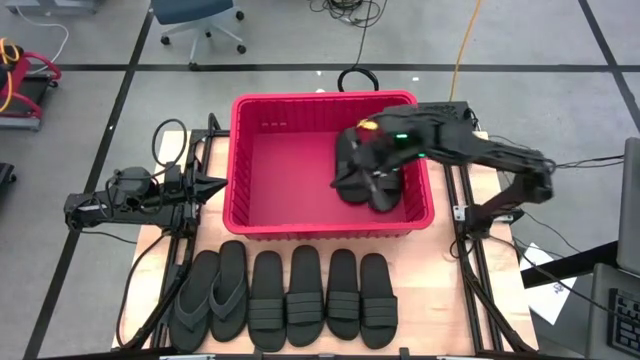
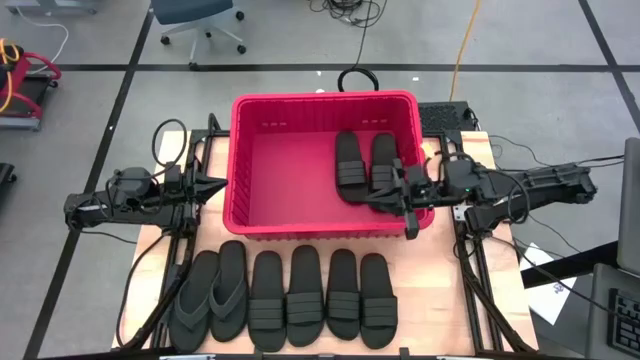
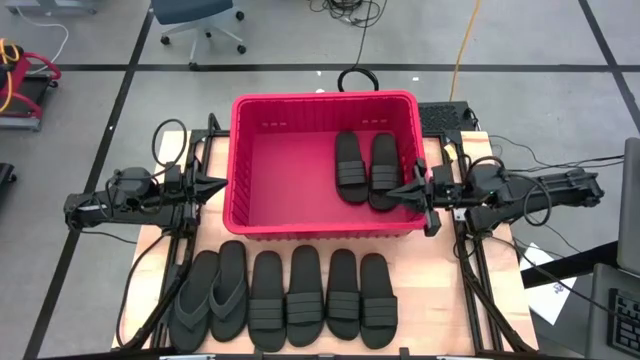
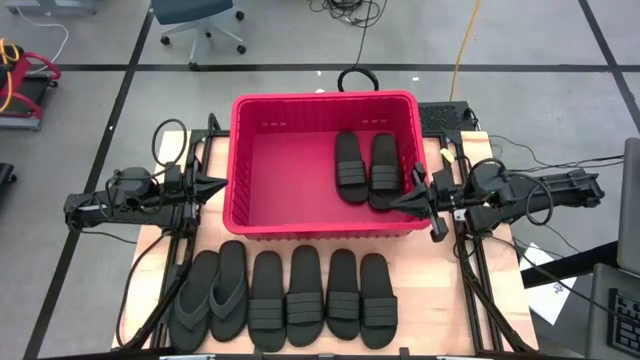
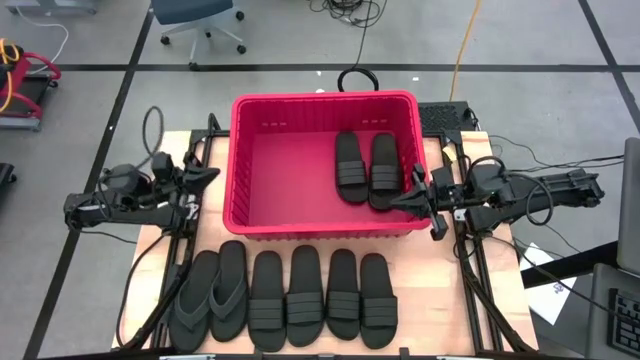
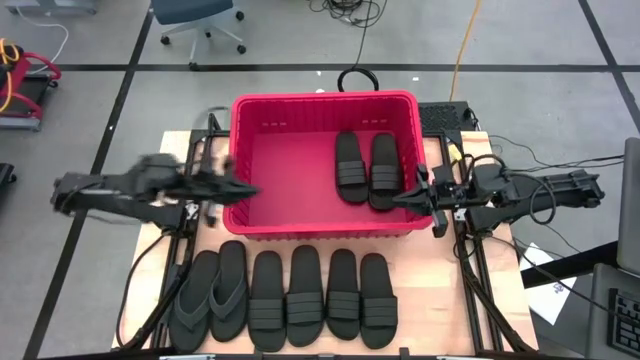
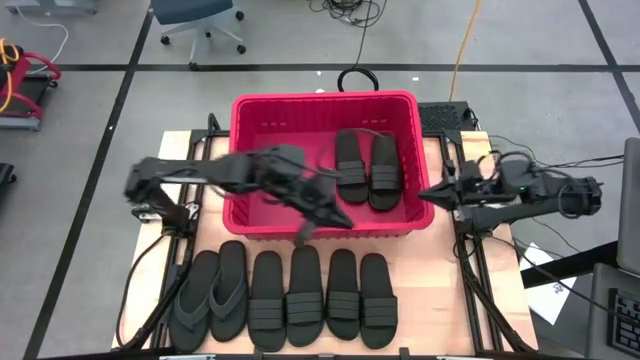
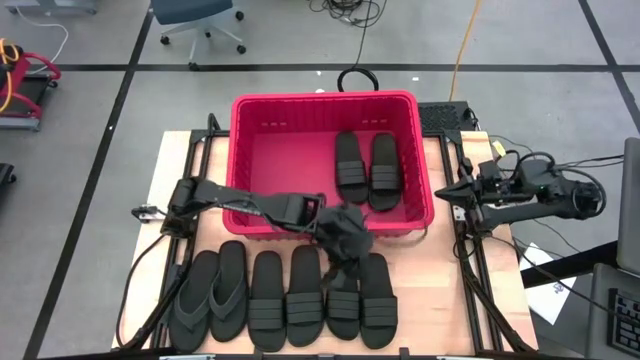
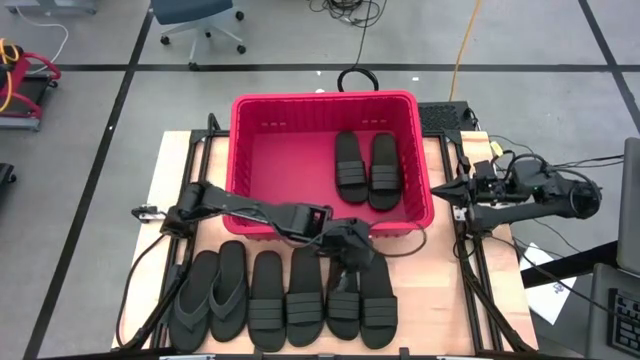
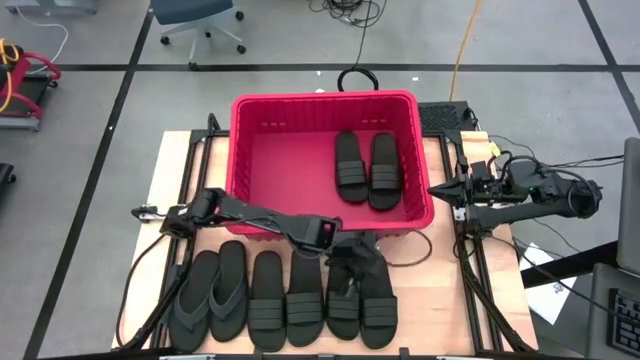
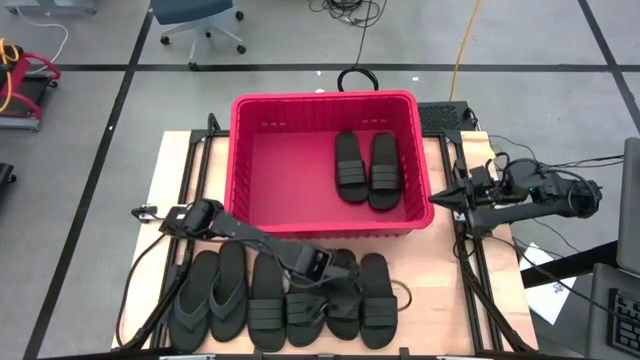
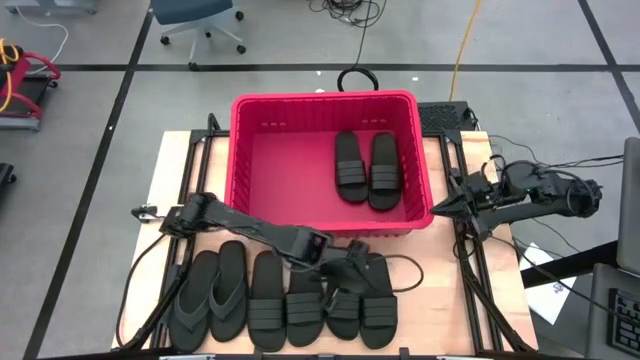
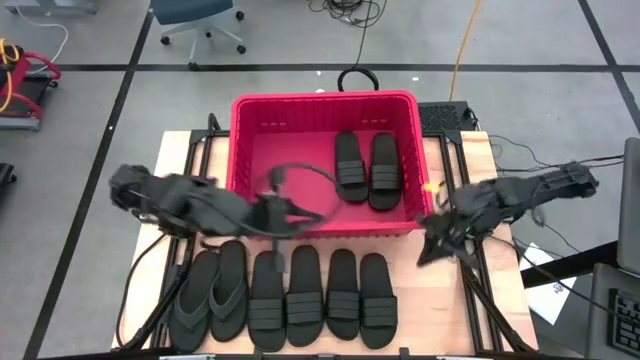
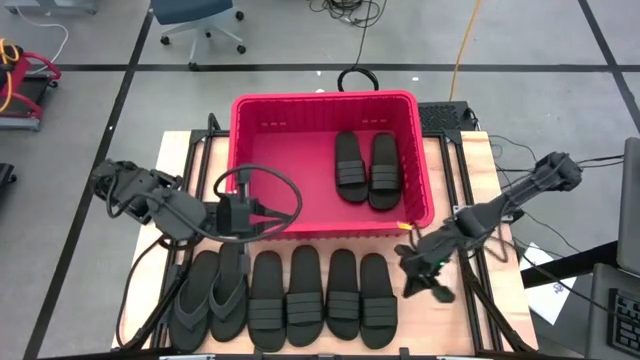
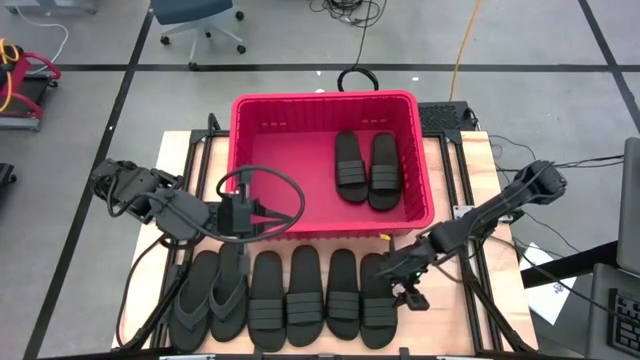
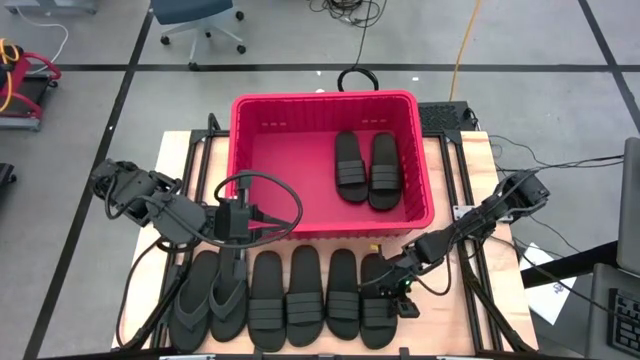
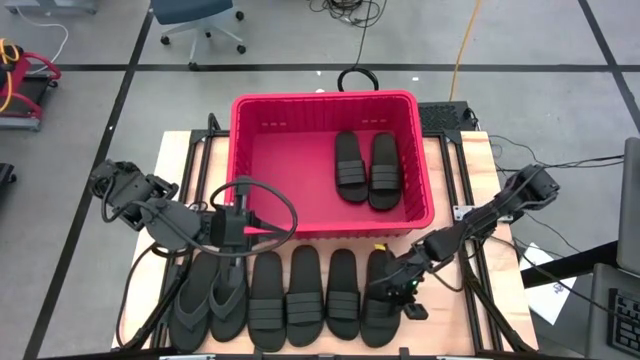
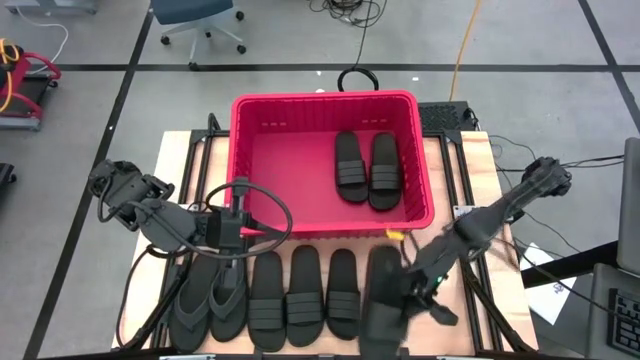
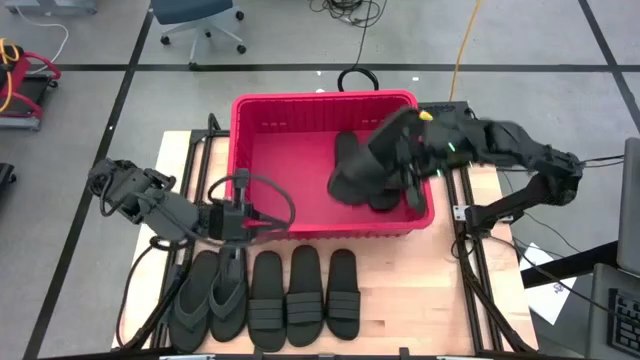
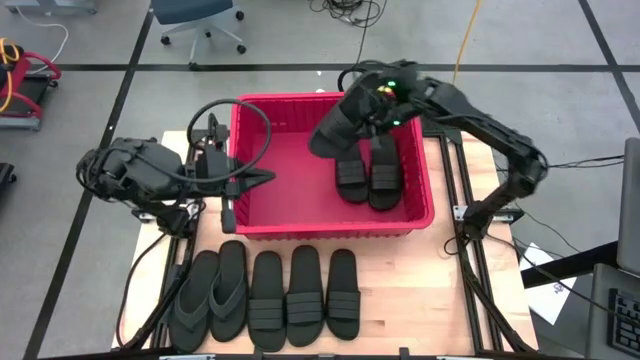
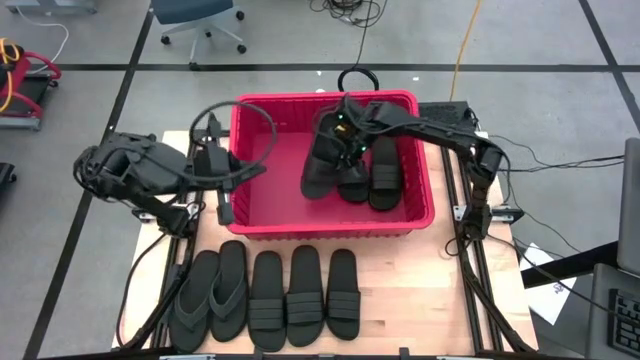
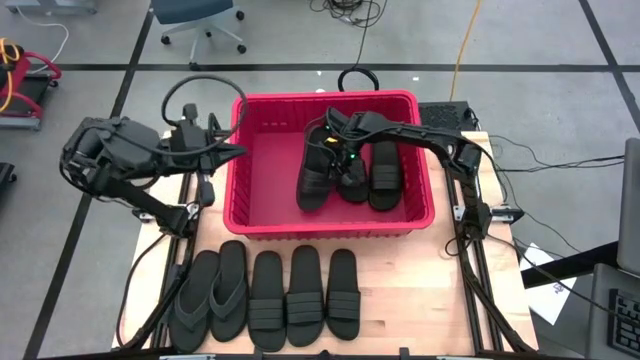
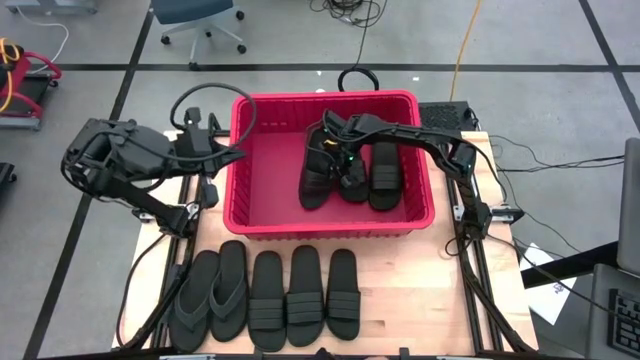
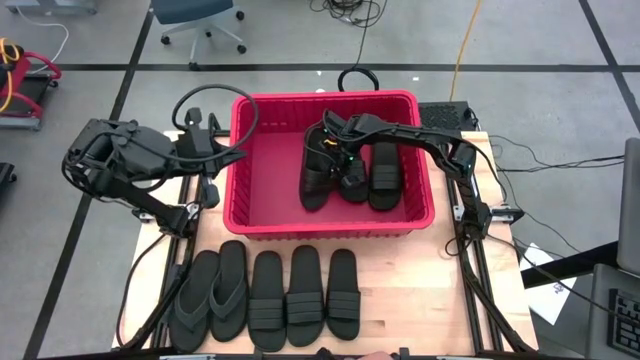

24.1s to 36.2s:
Task: Pick and place slides into bin
Put the black slide into the red bin

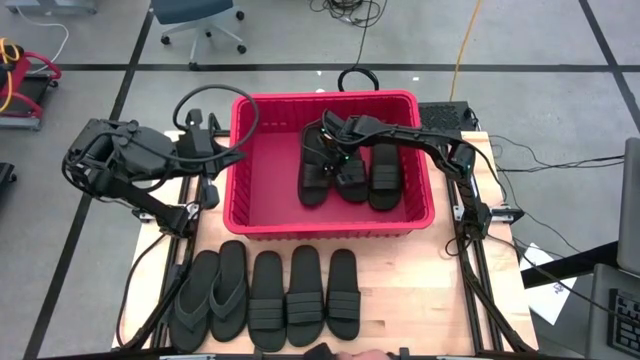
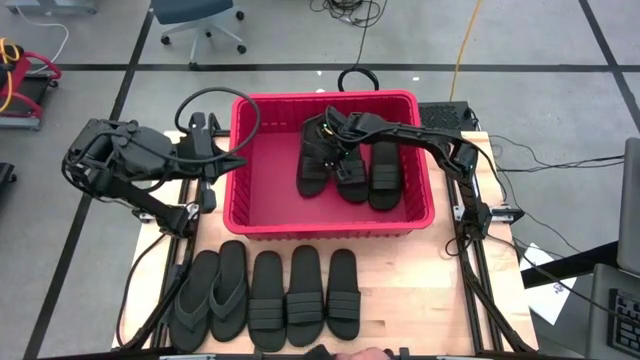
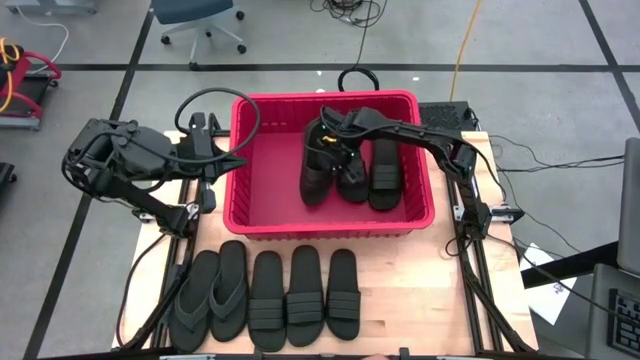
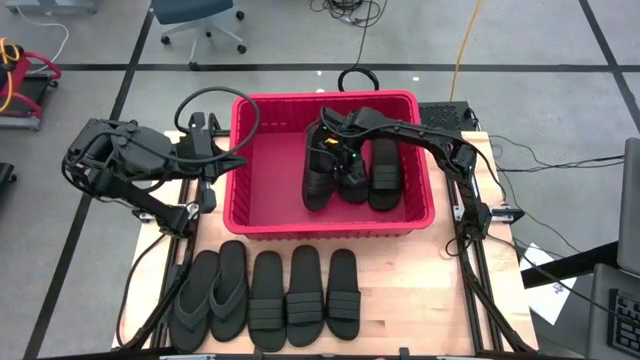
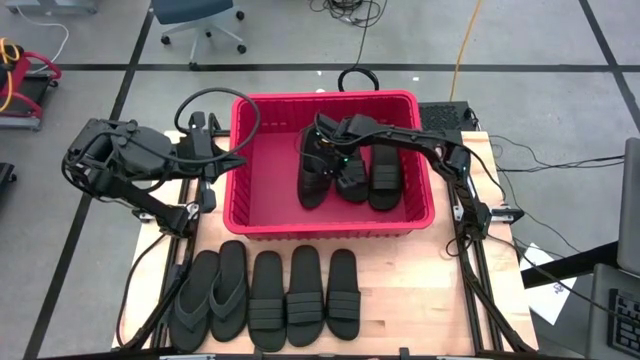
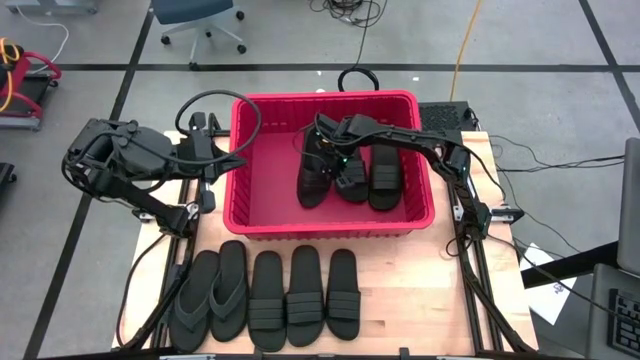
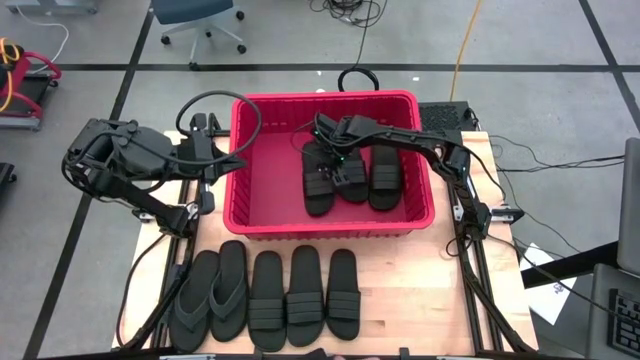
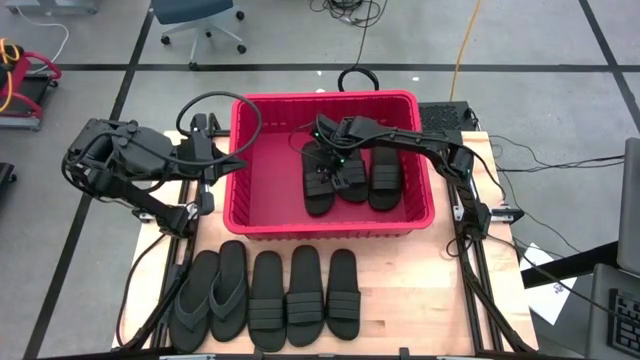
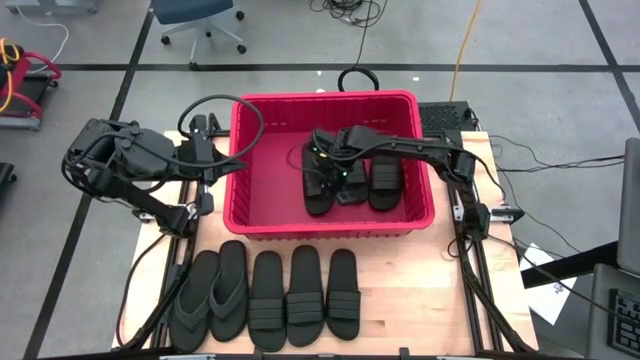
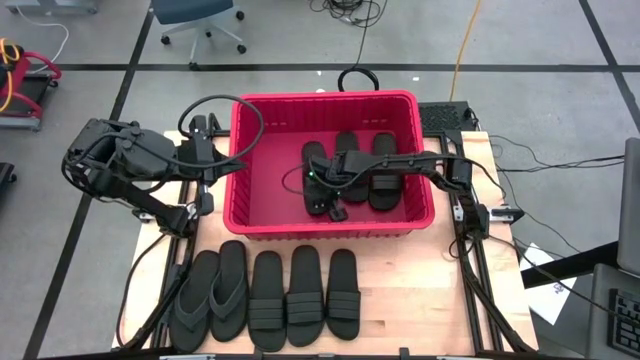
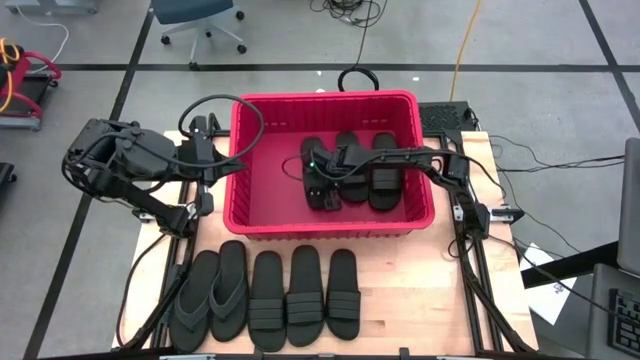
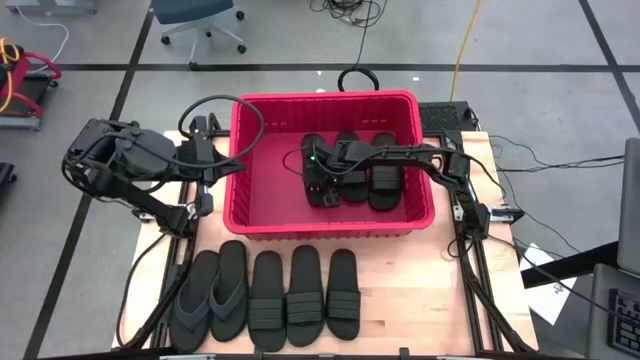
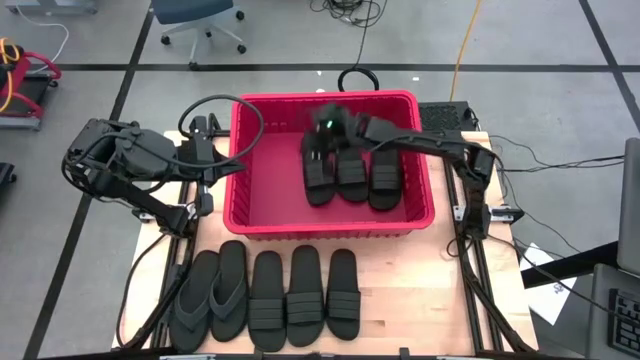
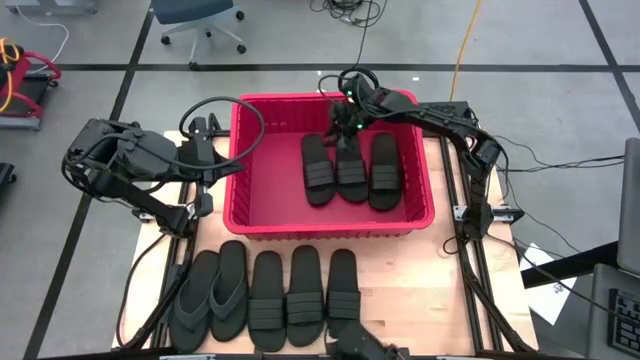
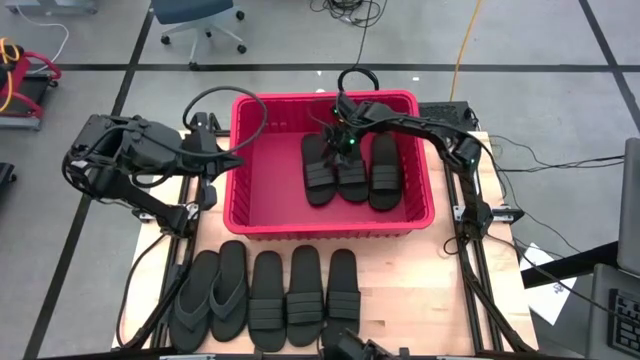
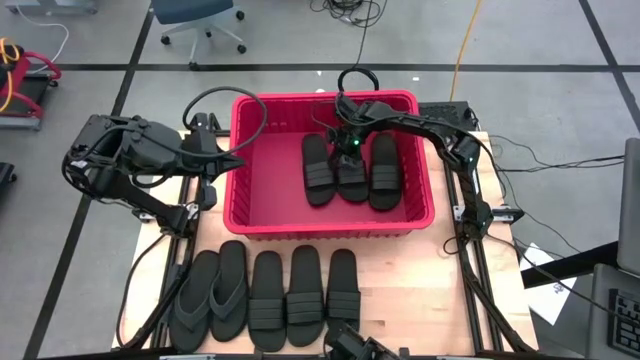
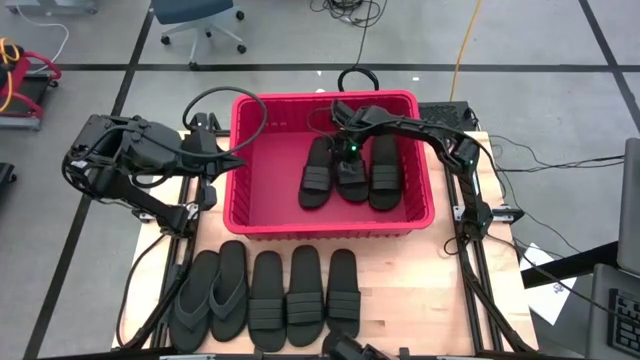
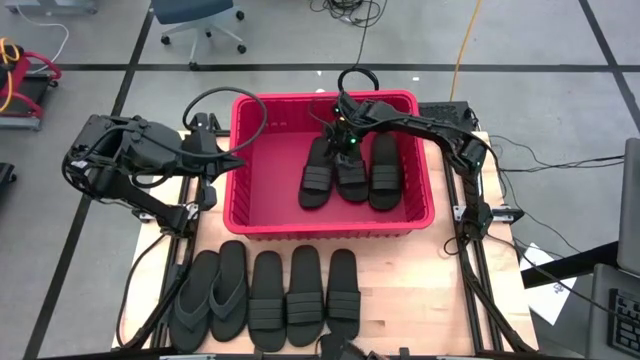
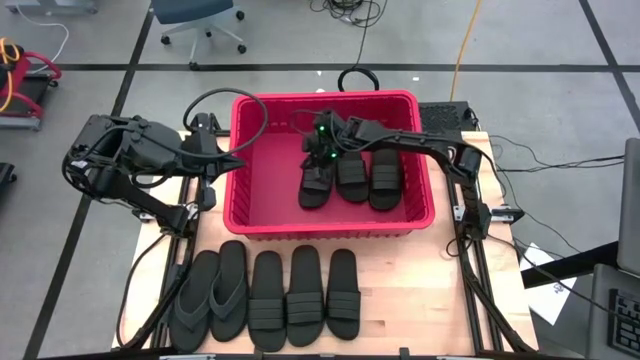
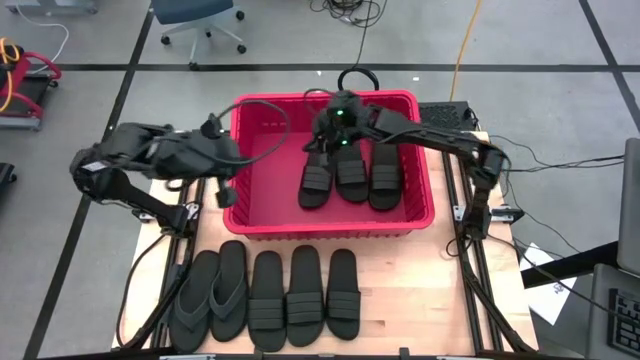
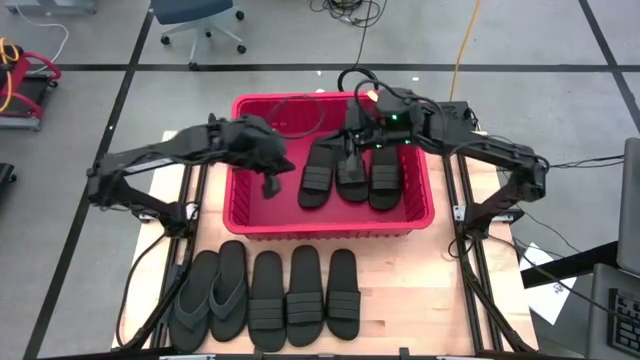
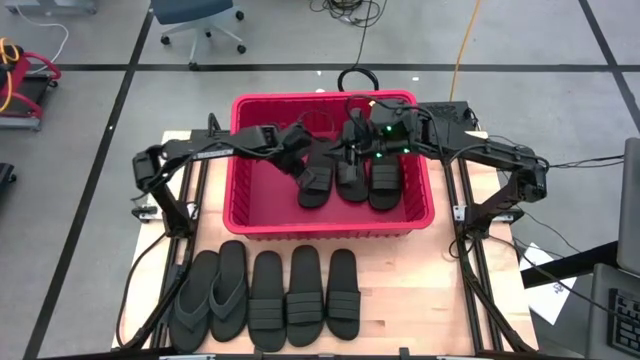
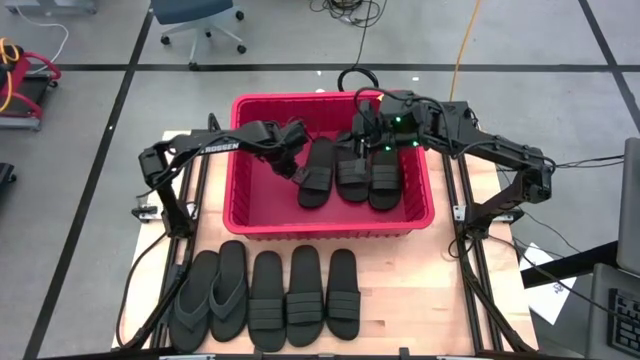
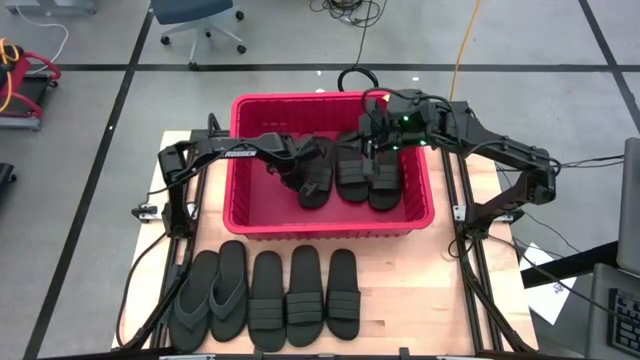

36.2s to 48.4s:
Put the black slide into the red bin
